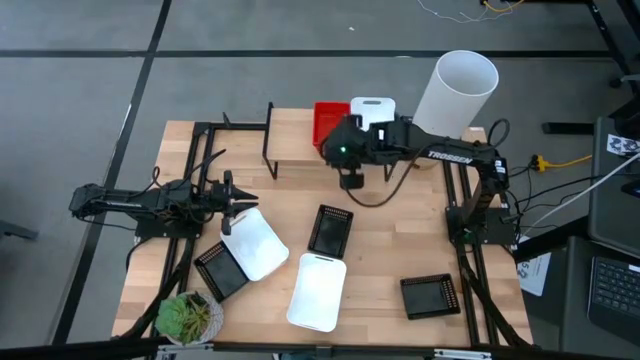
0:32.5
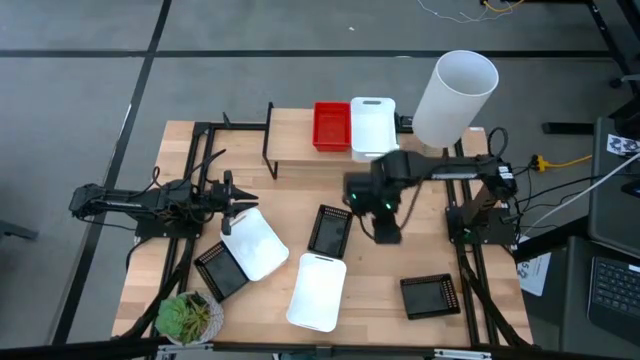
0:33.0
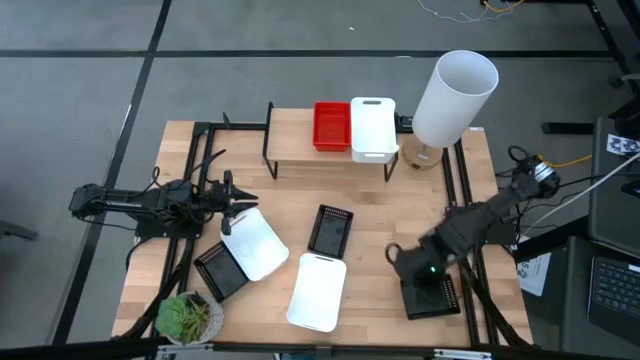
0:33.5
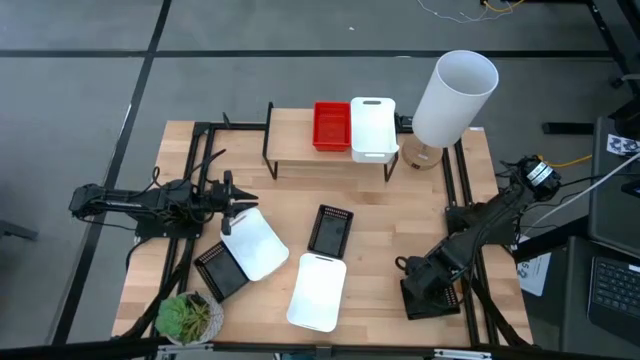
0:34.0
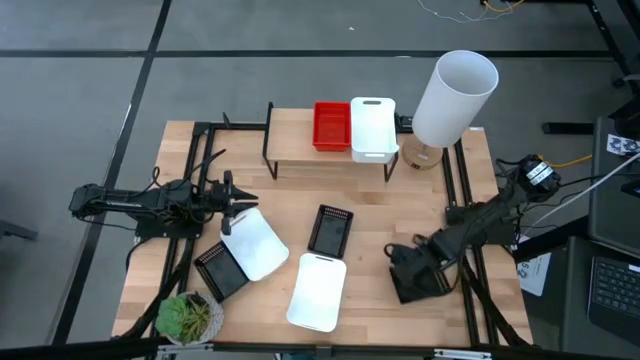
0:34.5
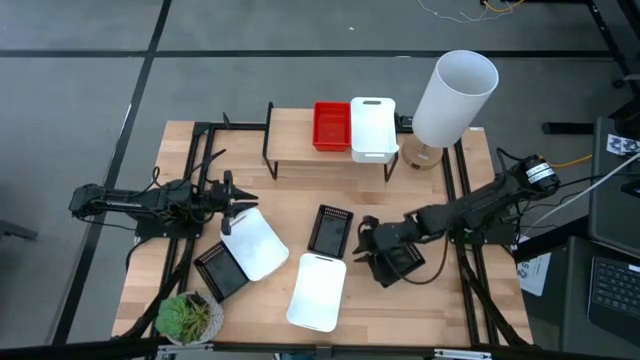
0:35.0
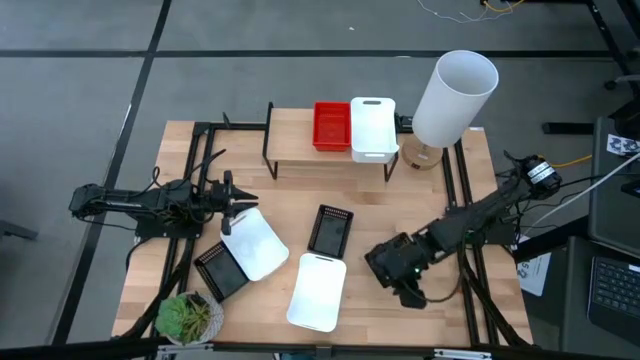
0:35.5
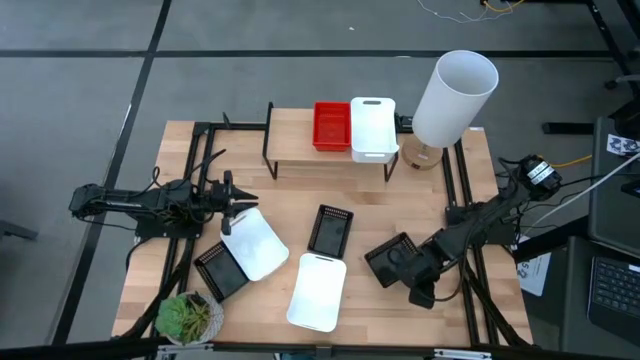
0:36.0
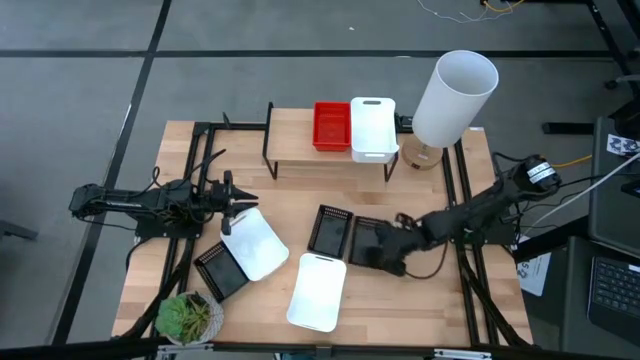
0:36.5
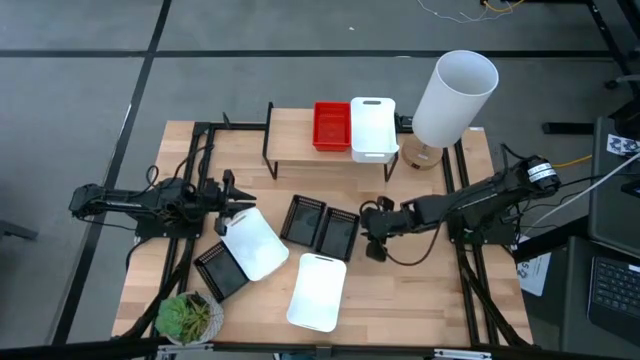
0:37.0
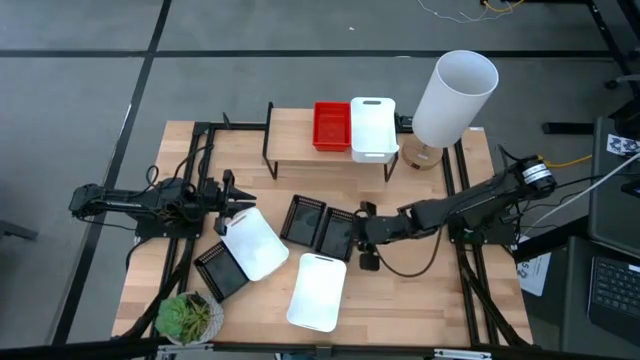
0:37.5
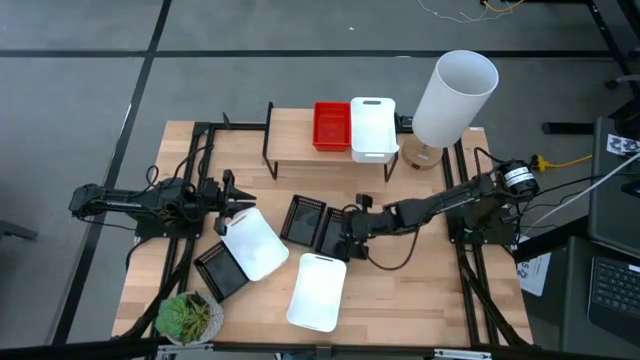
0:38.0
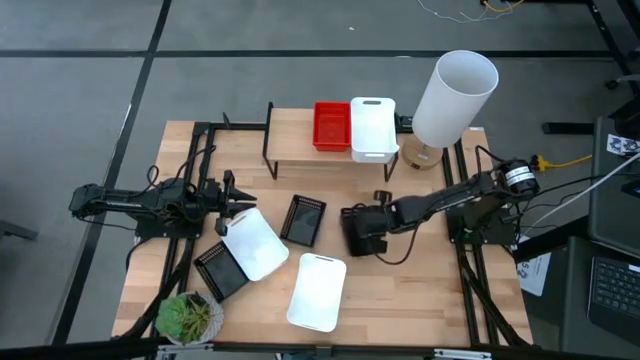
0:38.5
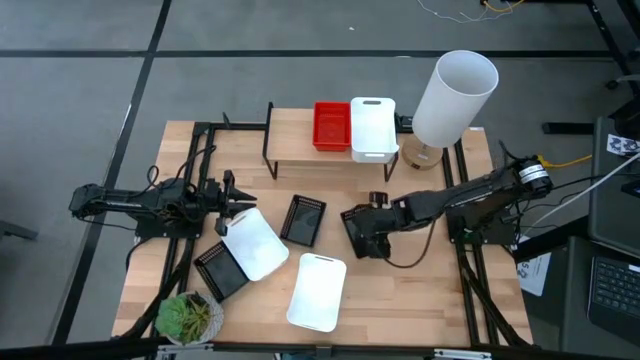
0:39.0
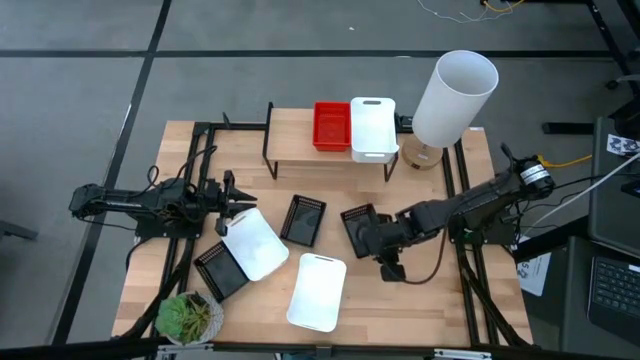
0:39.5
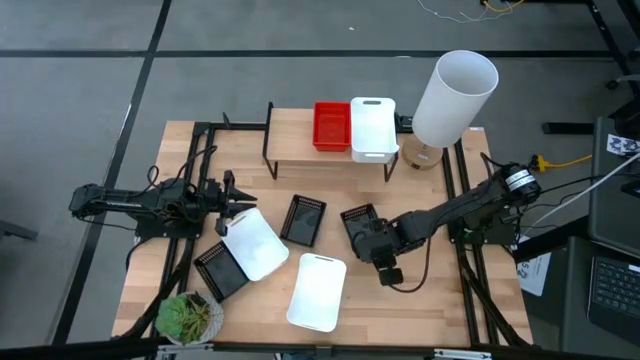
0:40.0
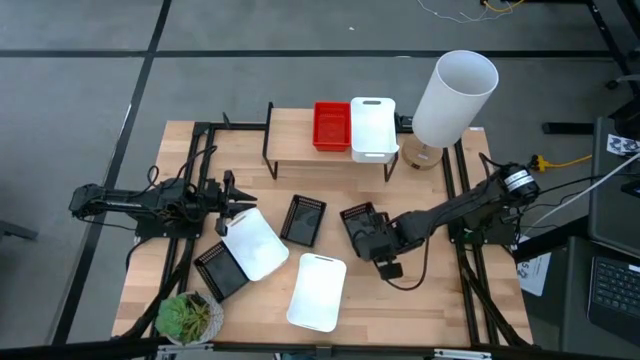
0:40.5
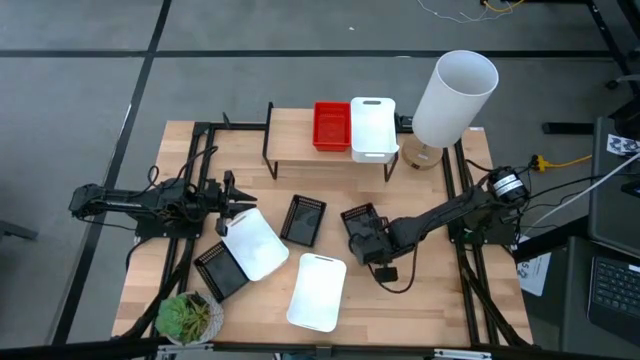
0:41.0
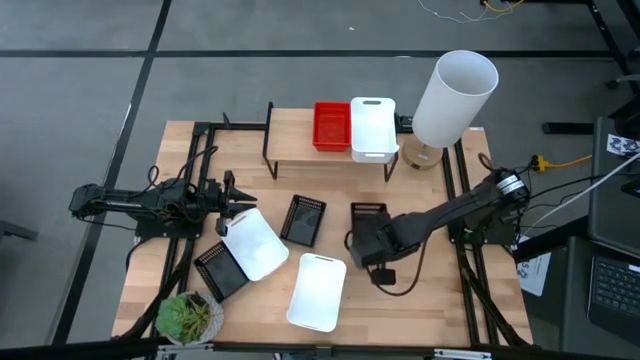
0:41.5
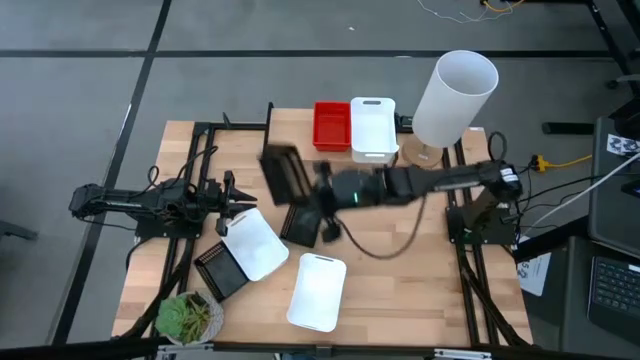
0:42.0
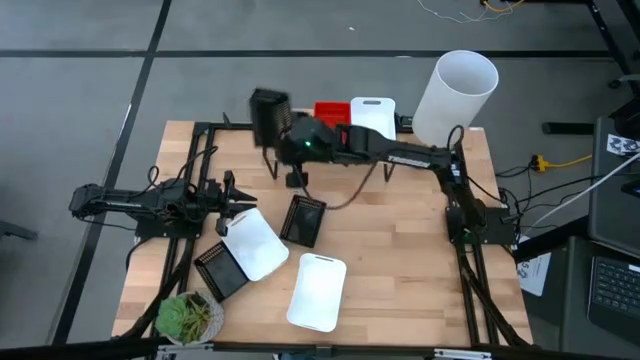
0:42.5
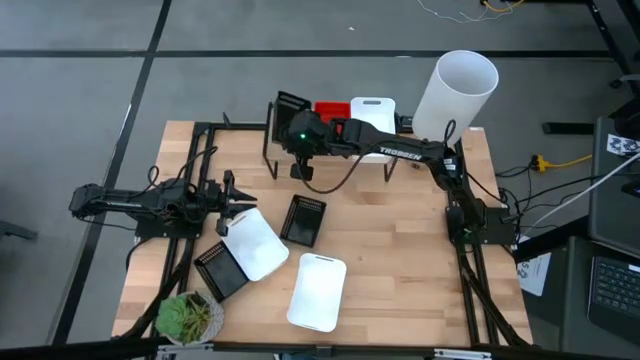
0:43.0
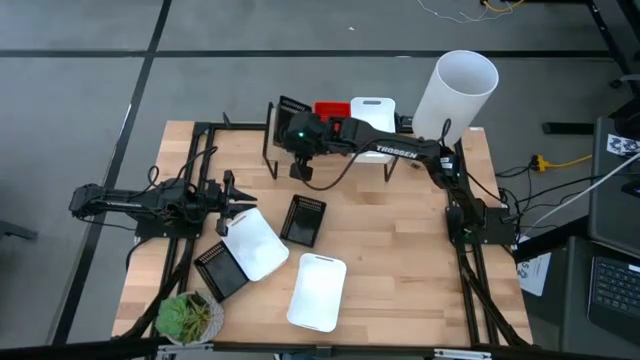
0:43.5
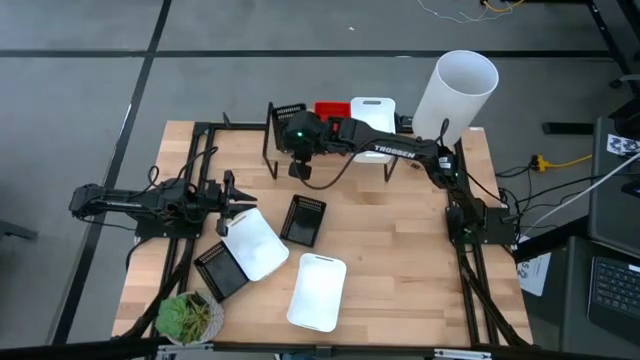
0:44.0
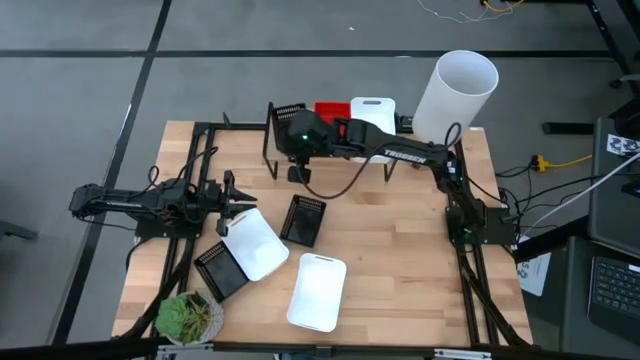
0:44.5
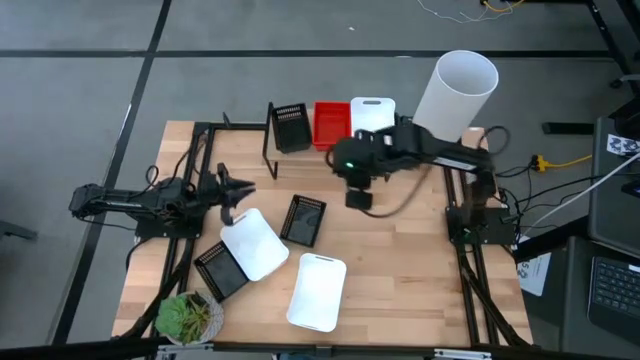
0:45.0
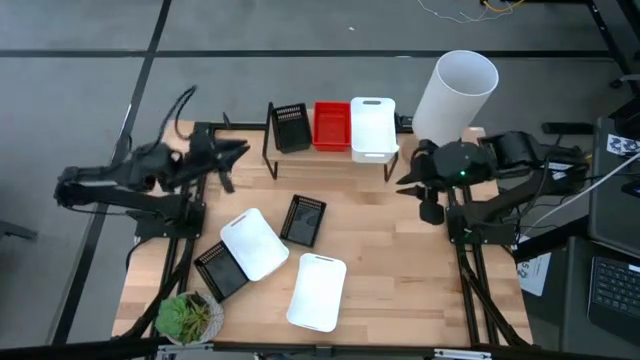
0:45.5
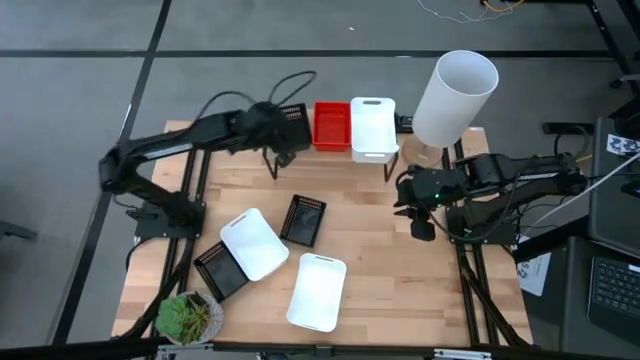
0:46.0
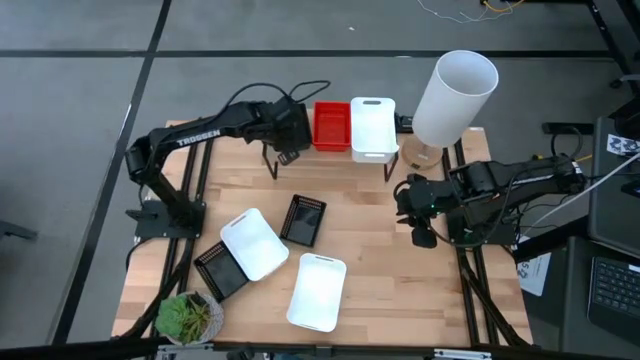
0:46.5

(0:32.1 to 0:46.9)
Task: Stack baskets on shelf by color
Put the bottom right black bin on the shelf

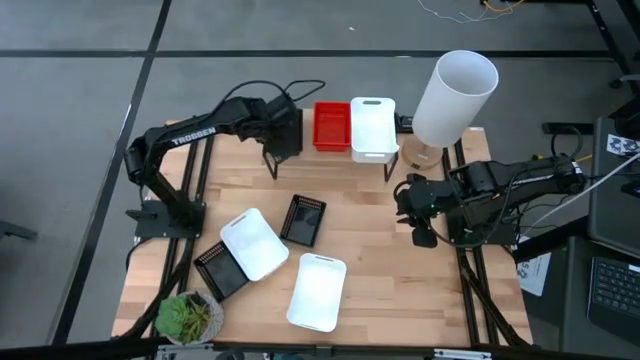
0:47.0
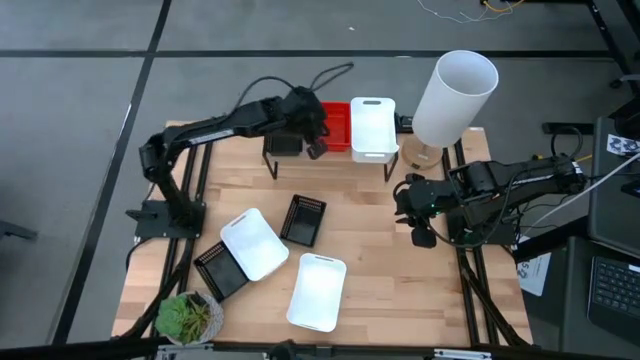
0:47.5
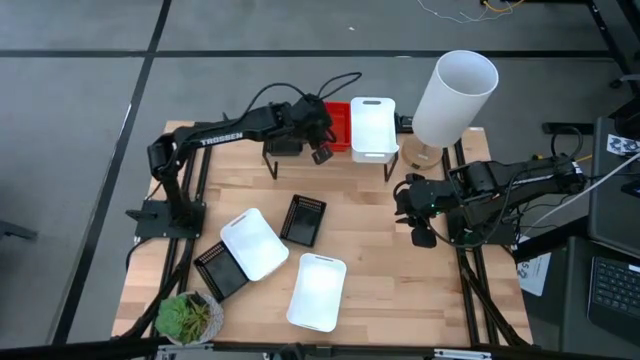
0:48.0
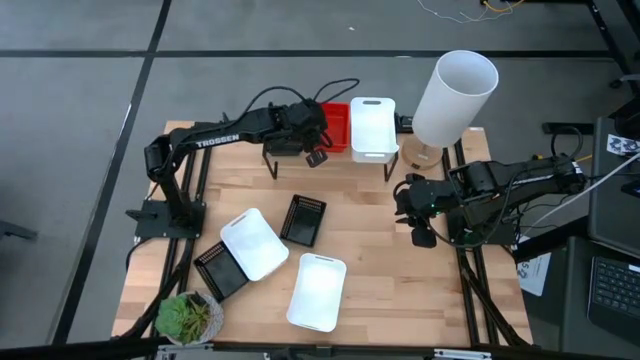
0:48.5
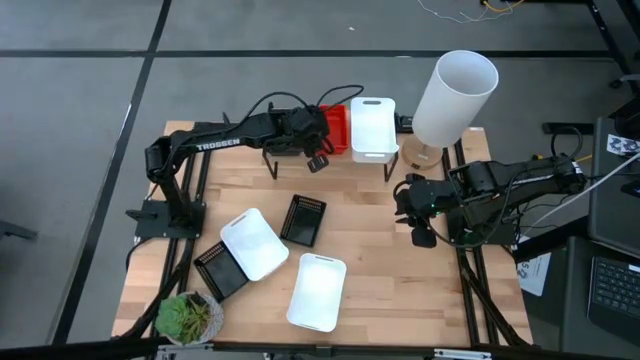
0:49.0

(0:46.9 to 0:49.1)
Adjust the stacked red bins on the shelf

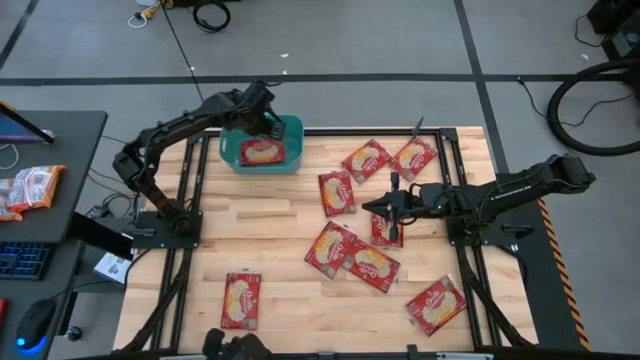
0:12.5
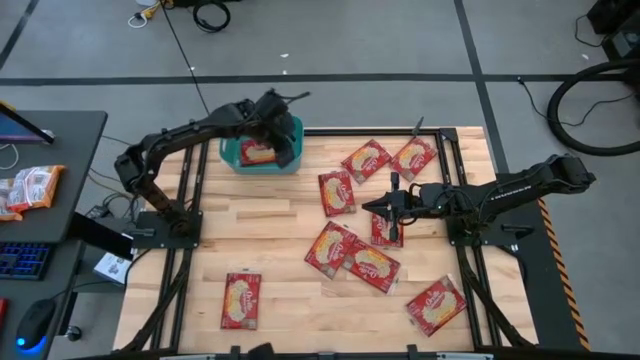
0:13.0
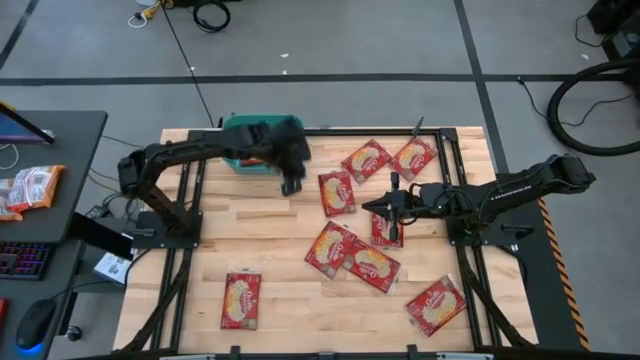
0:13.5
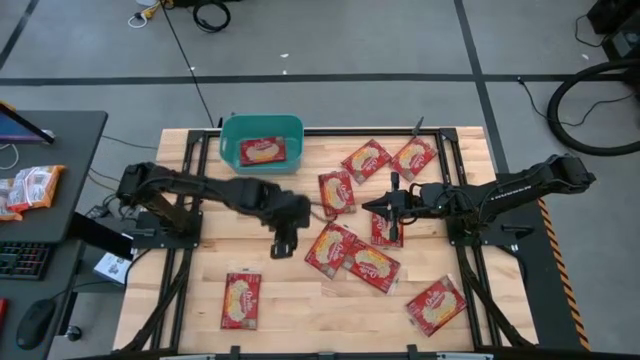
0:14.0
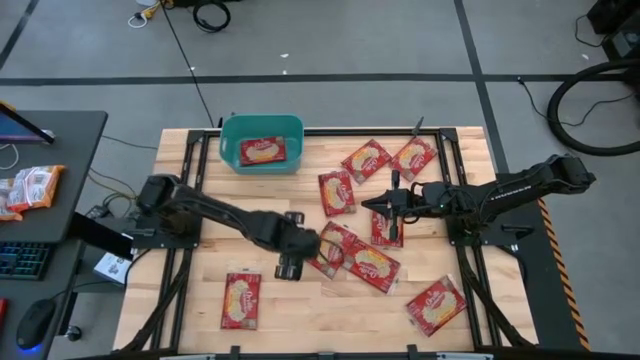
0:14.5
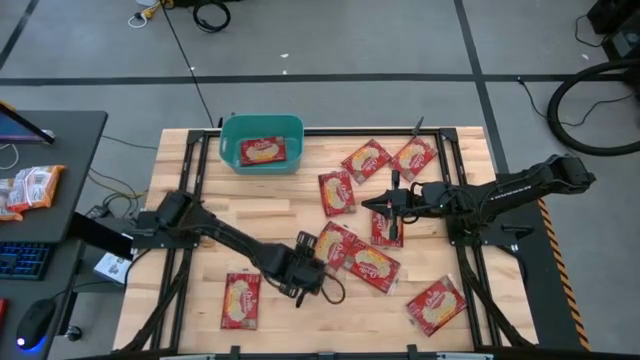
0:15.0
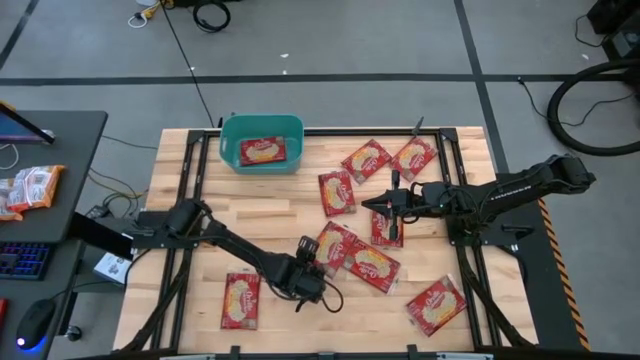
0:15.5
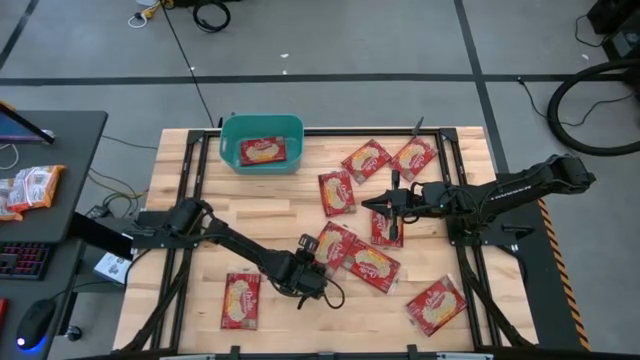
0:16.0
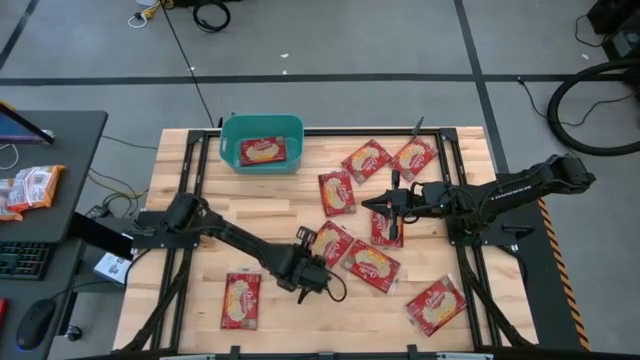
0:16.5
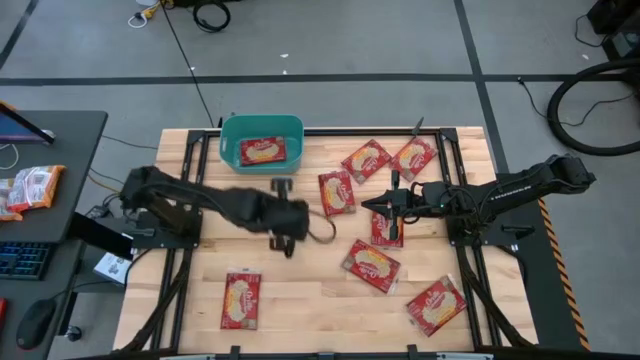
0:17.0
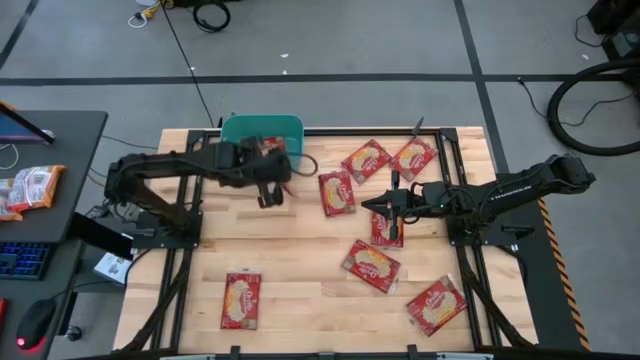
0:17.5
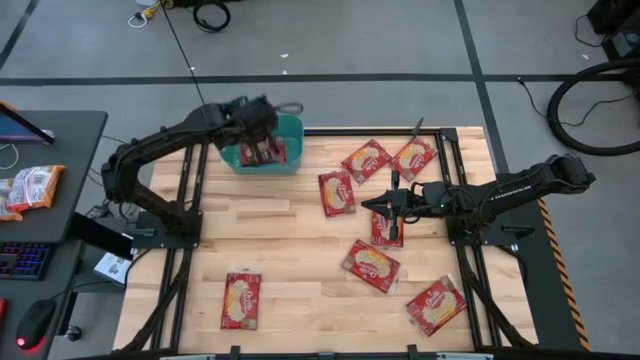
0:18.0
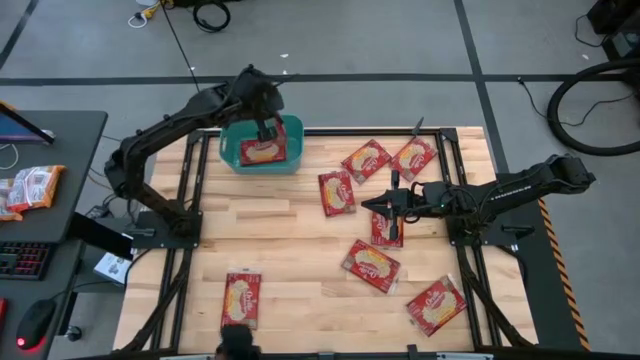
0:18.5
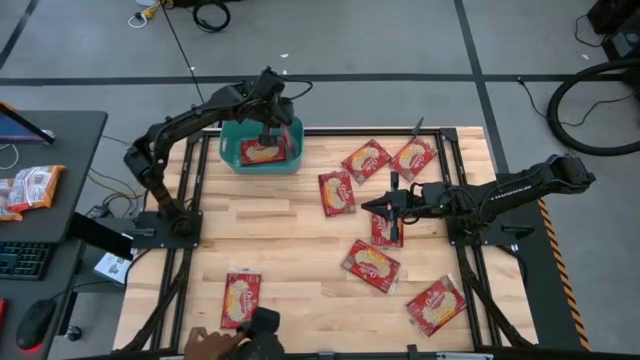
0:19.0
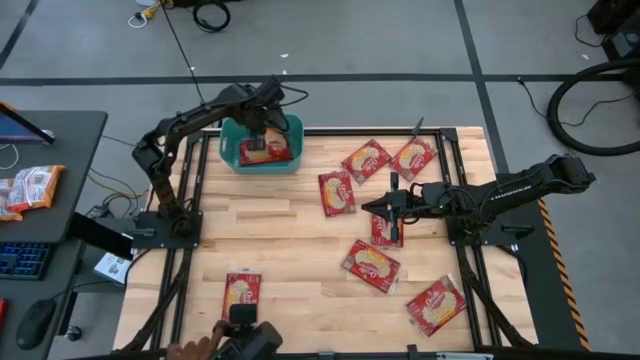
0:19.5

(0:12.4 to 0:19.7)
Task: Sort popcorn bags into baskets
Put the popcorn bag into the blue bin
